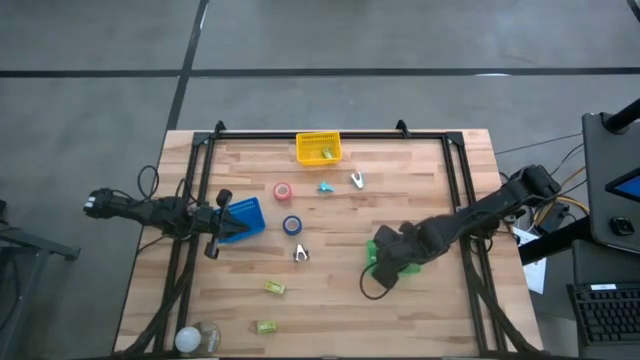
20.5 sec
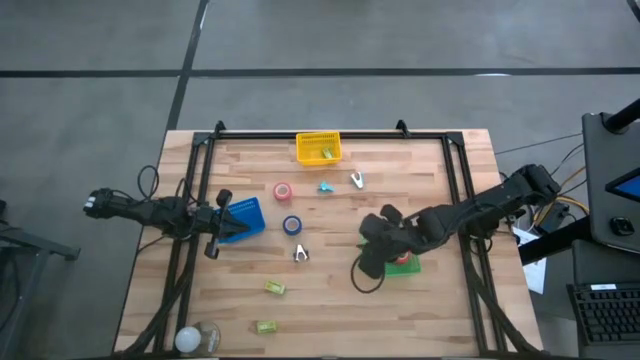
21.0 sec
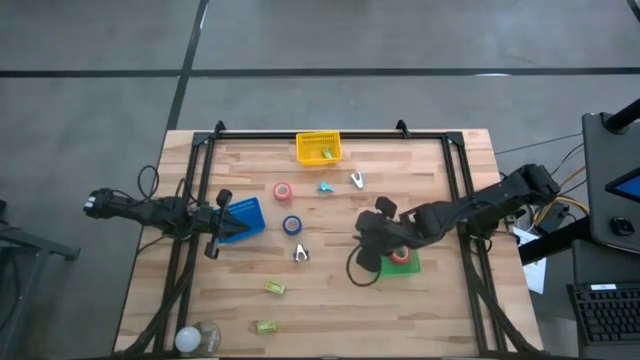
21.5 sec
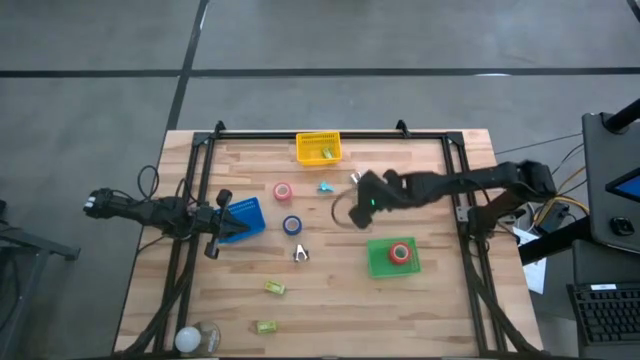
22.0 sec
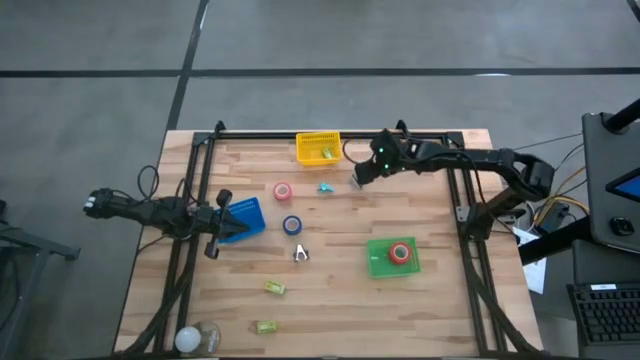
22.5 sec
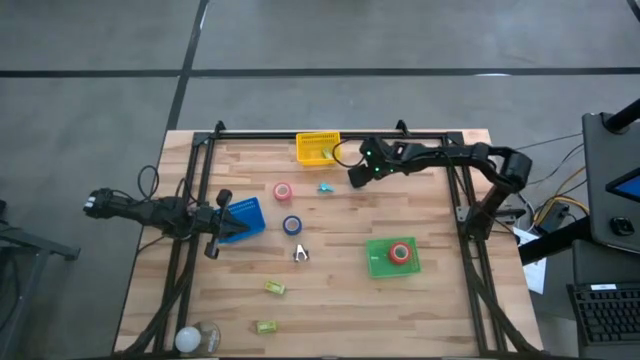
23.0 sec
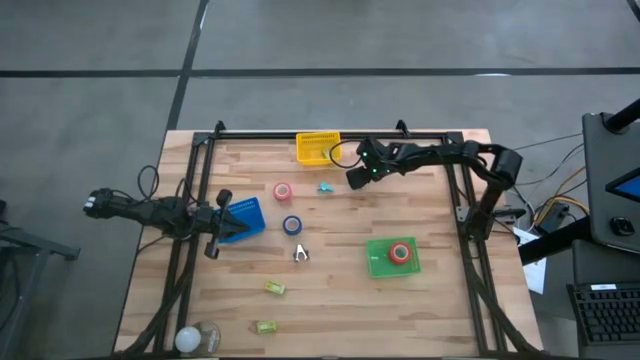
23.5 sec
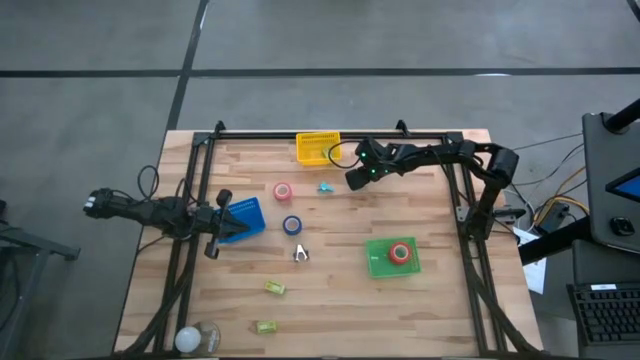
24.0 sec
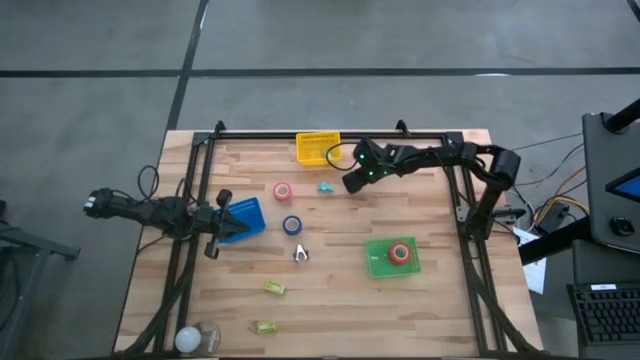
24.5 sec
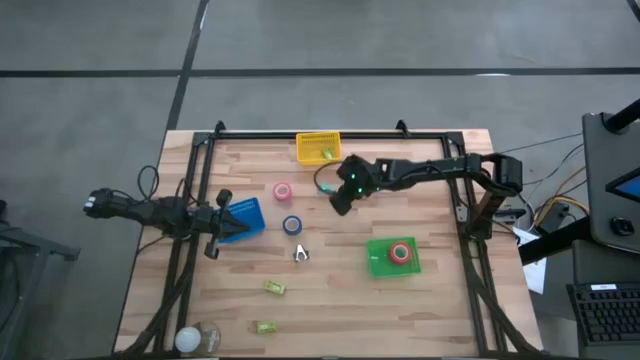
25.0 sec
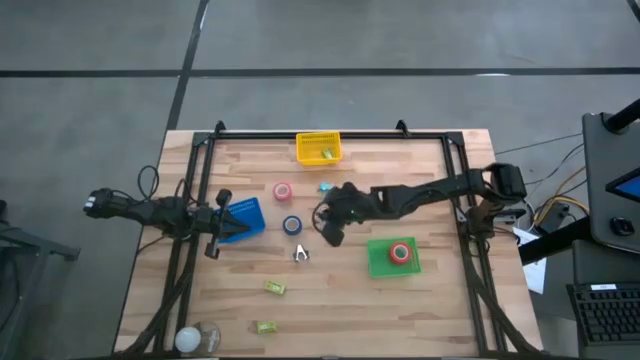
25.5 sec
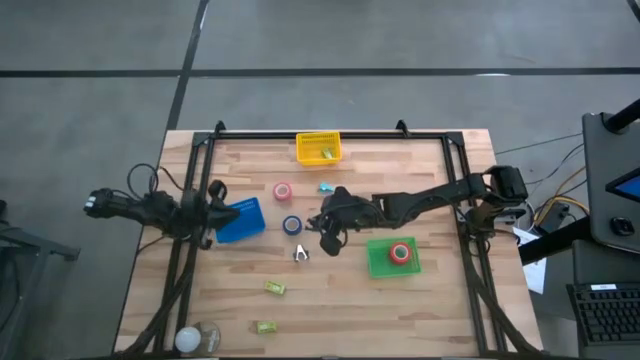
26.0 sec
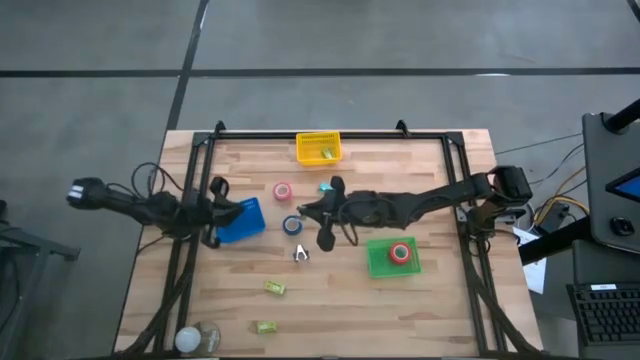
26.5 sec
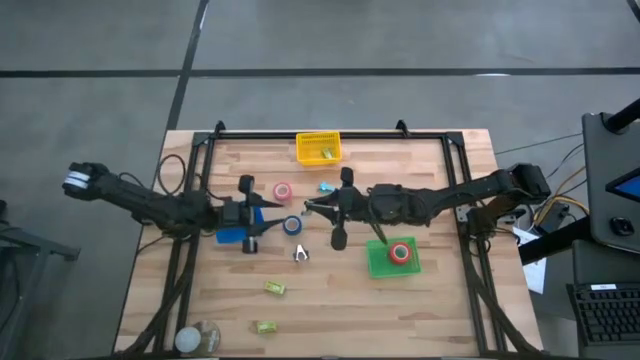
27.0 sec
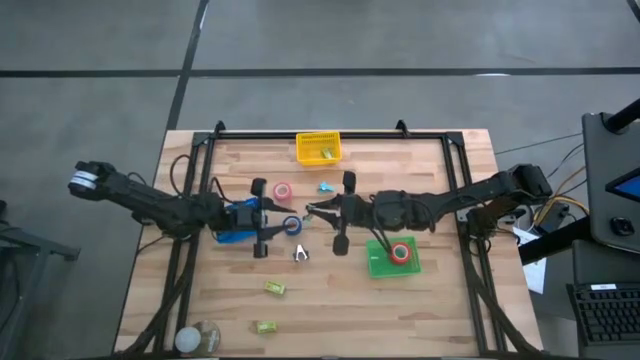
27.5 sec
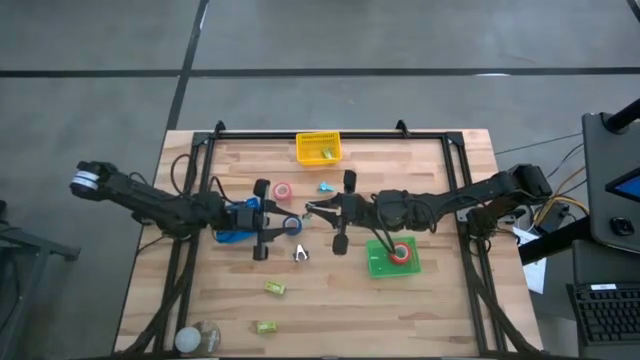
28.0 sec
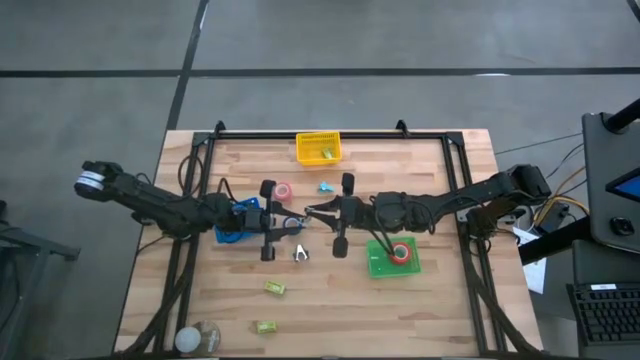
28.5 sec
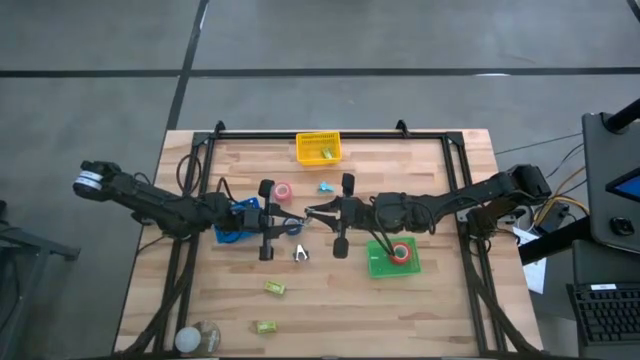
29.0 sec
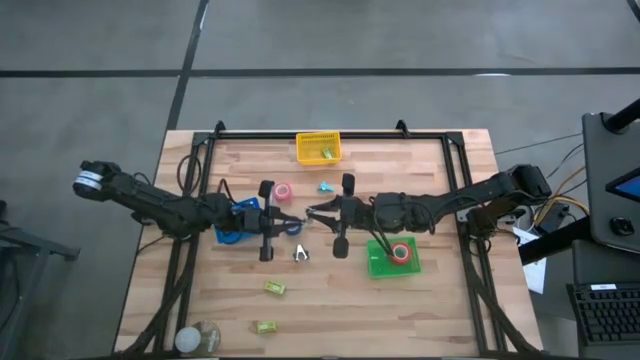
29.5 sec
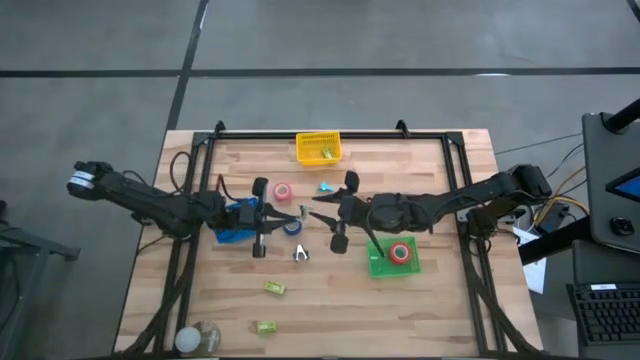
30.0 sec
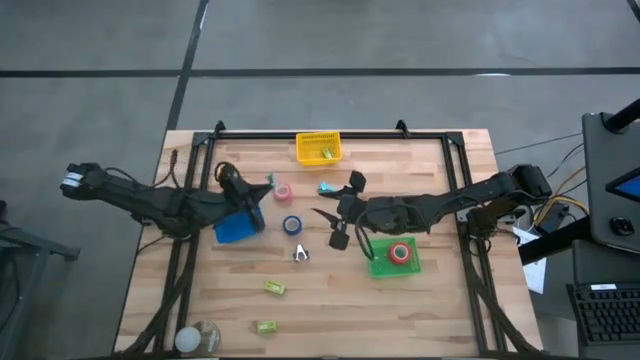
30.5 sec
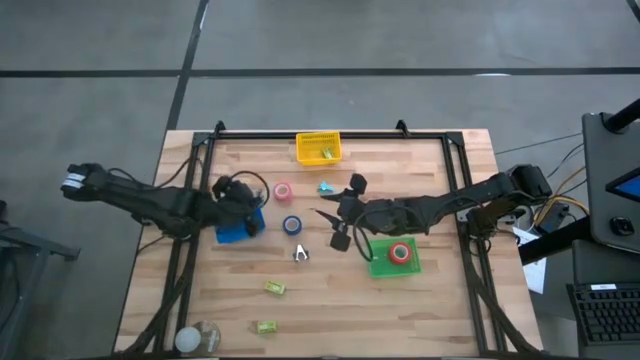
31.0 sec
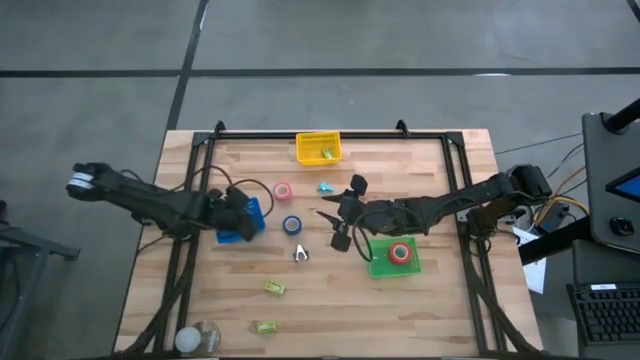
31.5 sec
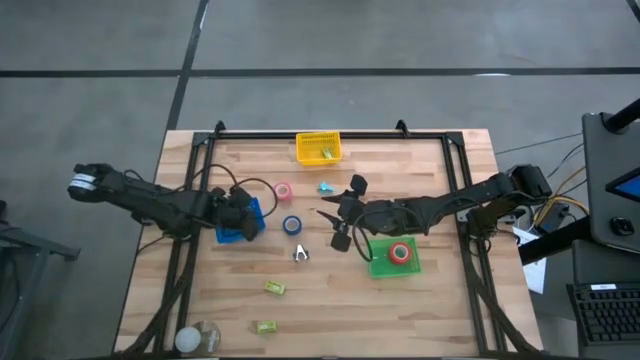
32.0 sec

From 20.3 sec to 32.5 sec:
Task: Pick and place Stapler, Stapler remover, tape
Put the right blue staple remover into the blue bin

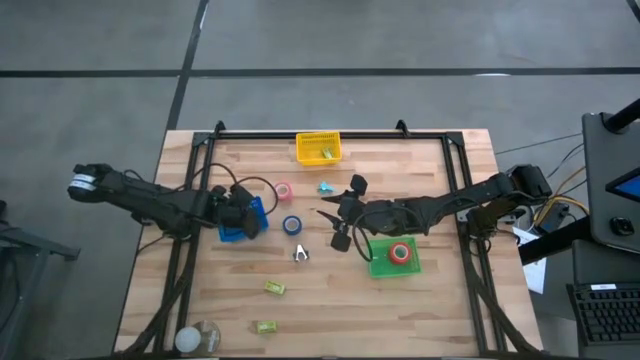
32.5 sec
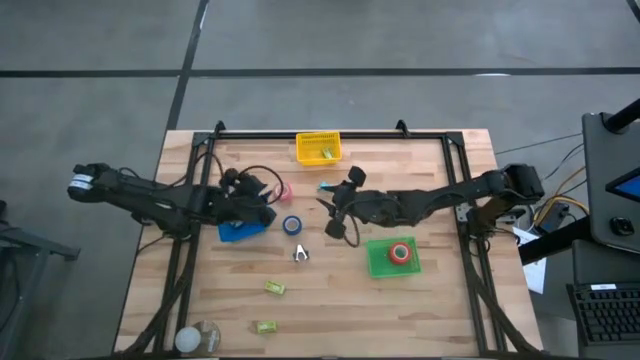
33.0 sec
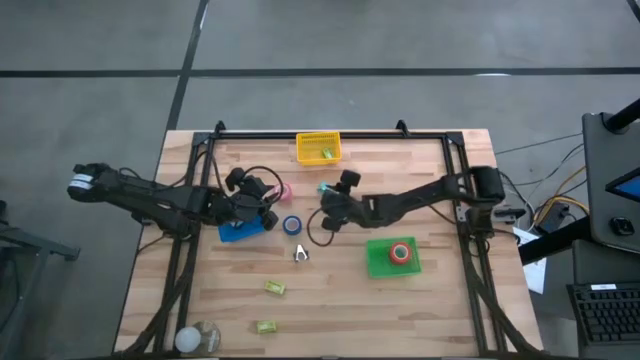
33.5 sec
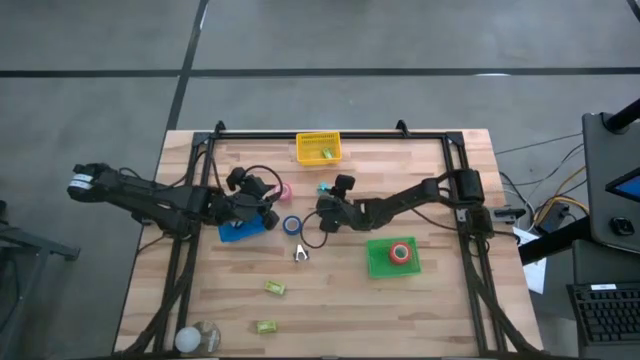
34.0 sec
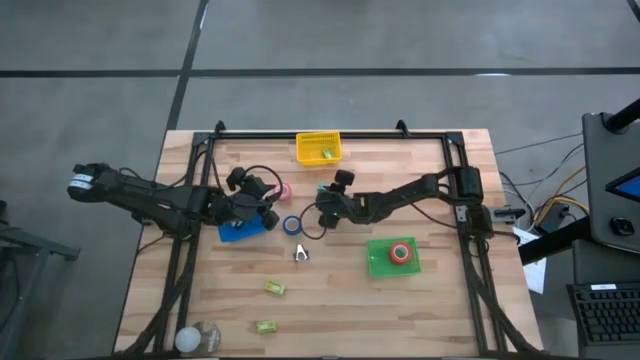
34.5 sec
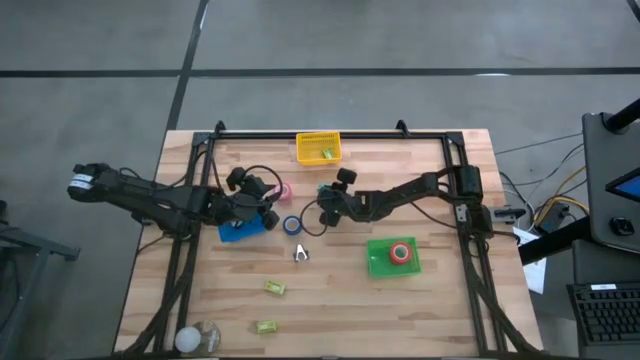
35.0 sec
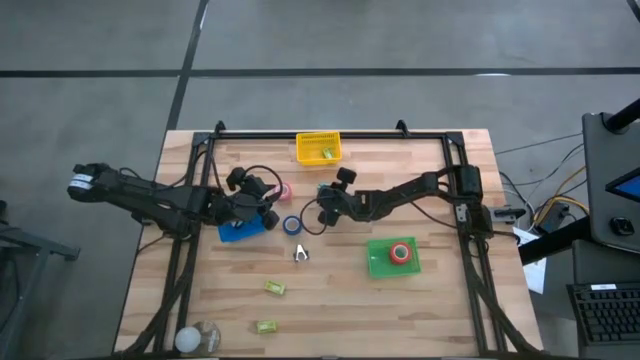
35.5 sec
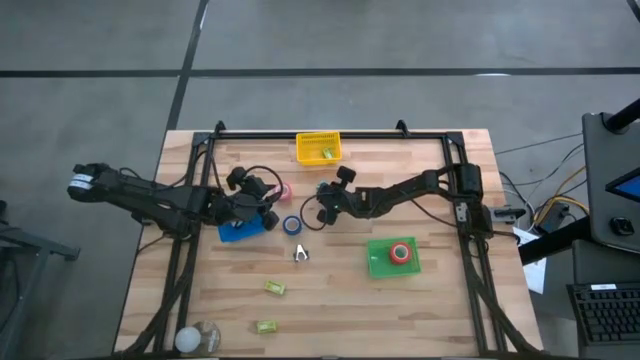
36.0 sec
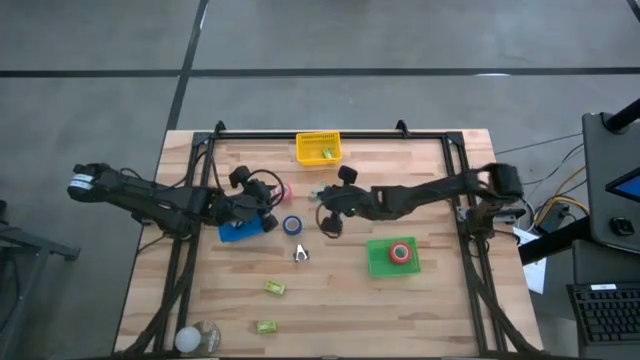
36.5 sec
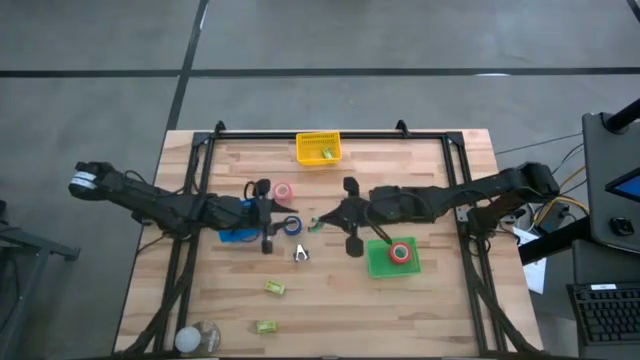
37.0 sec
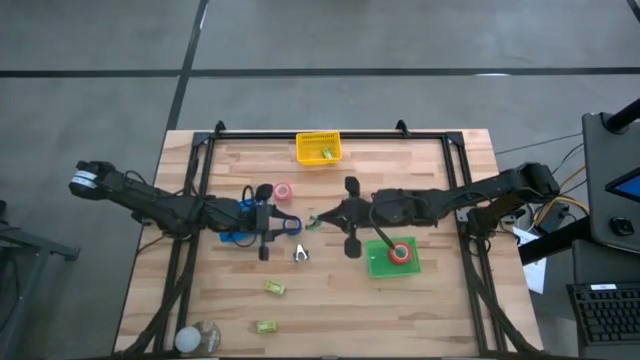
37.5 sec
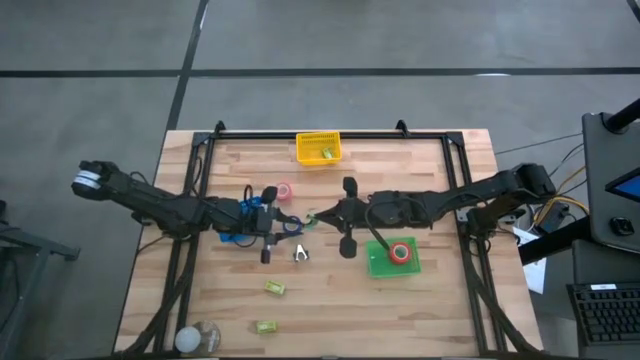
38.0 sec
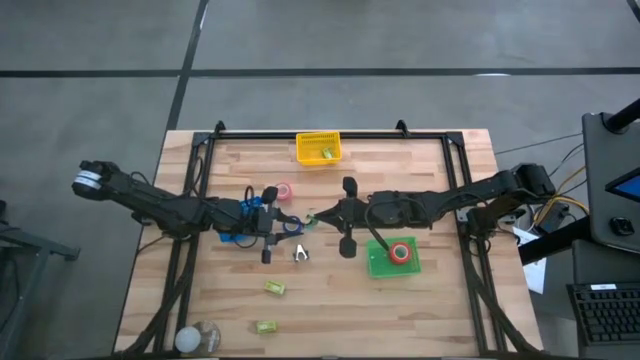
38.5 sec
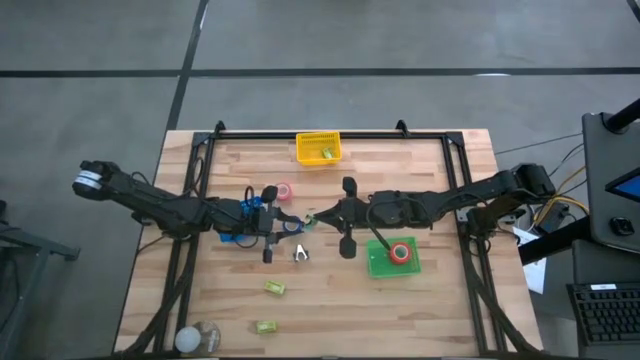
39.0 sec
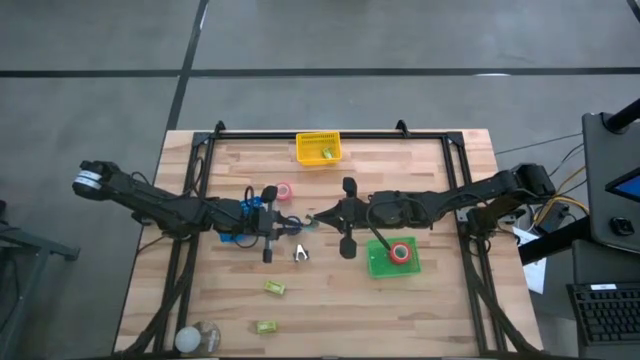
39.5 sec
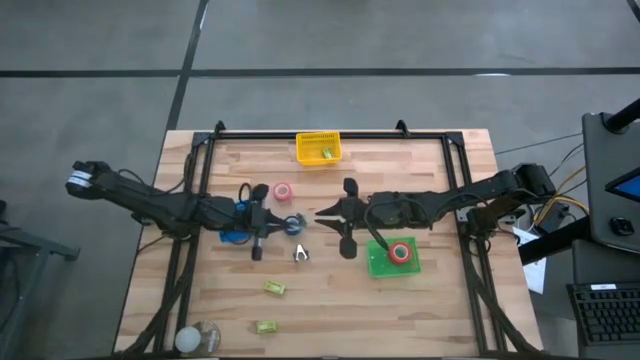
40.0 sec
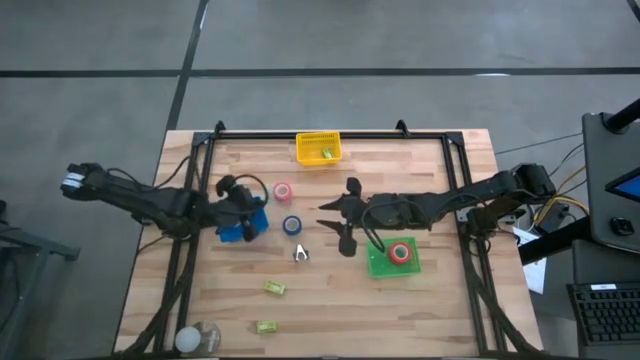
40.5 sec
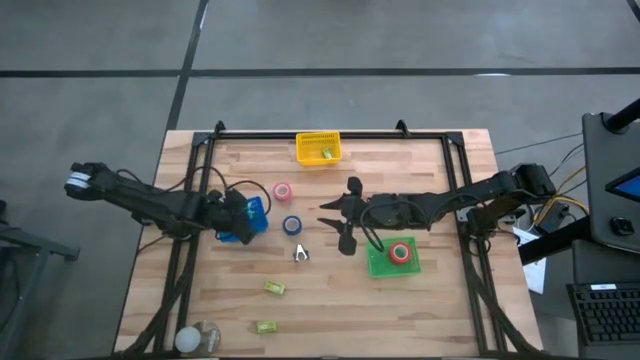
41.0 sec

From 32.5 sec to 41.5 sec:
Put the blue staple remover into the blue bin

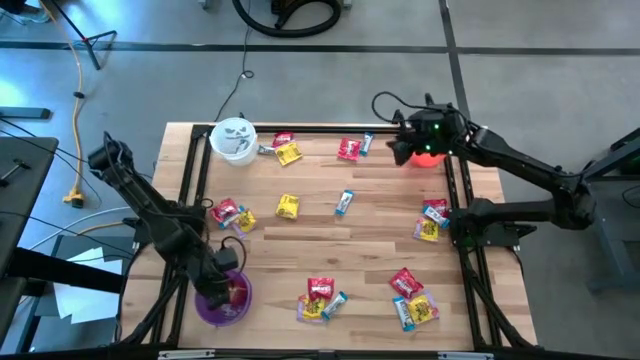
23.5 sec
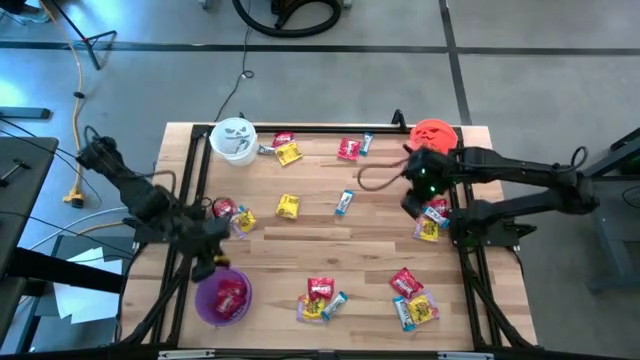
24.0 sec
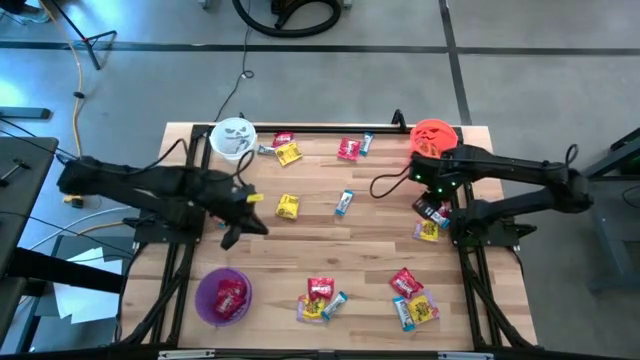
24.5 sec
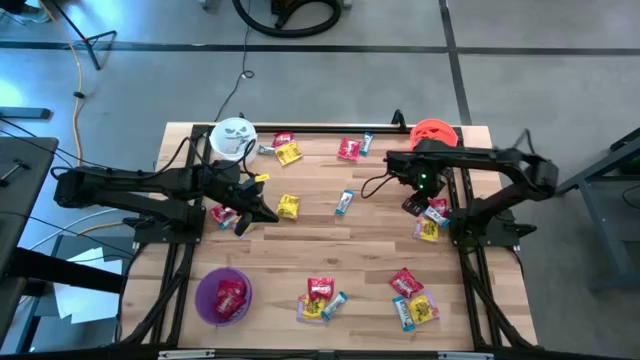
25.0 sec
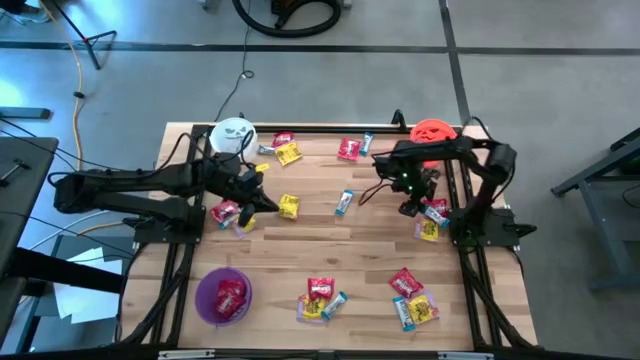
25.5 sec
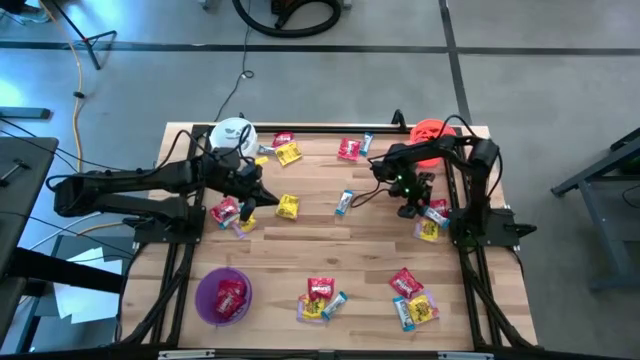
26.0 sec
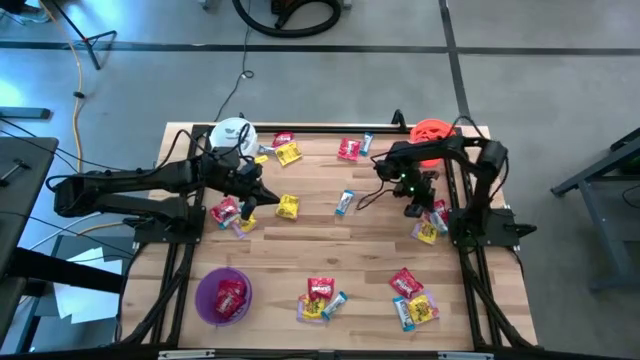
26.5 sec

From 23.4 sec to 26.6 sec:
Task: Sort candy
Put the white candy into the white bucket
